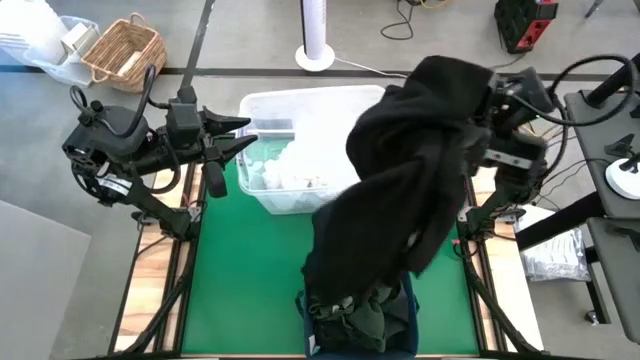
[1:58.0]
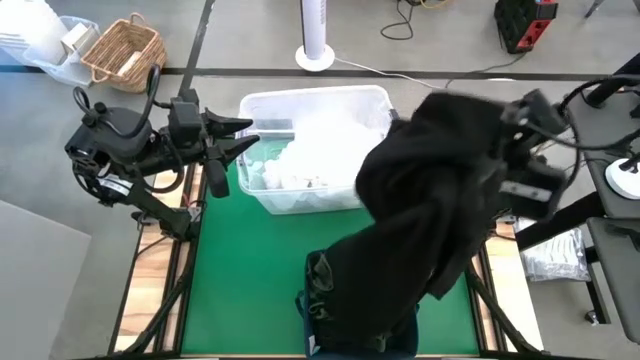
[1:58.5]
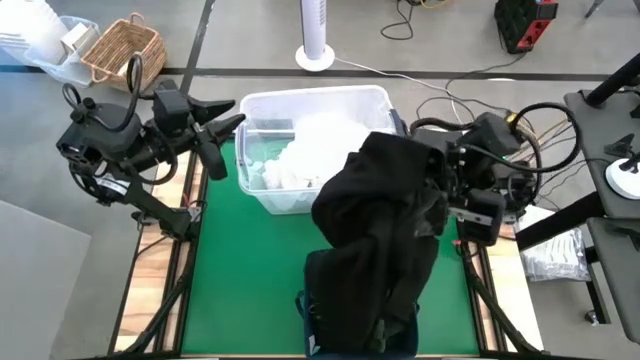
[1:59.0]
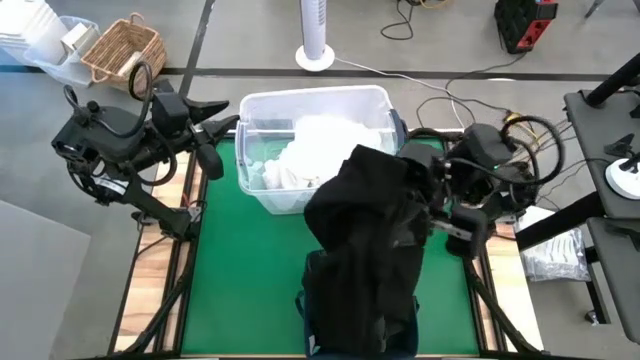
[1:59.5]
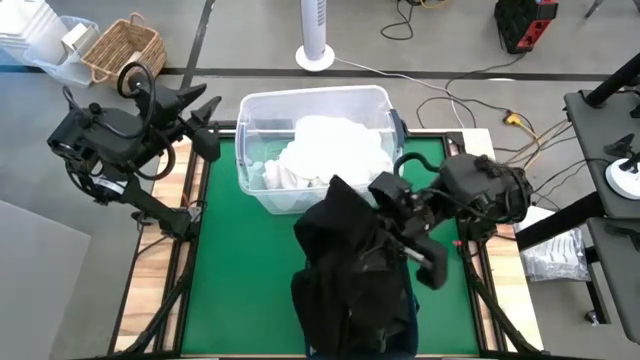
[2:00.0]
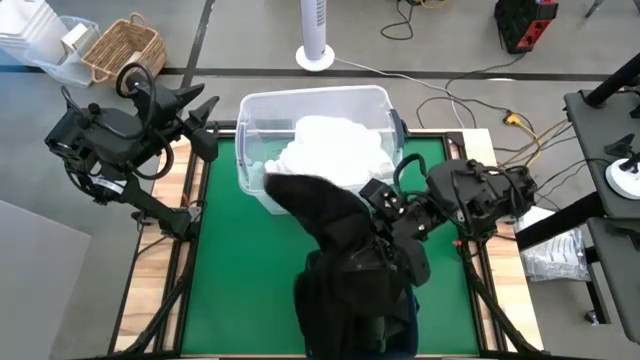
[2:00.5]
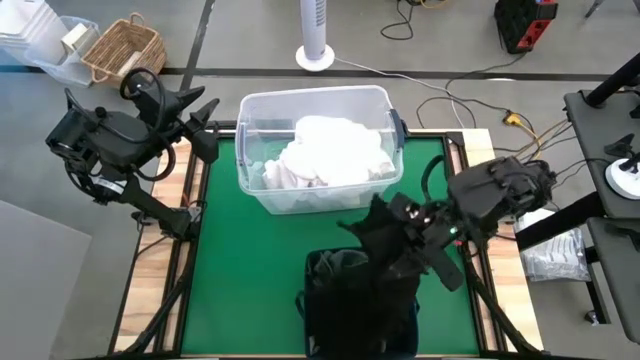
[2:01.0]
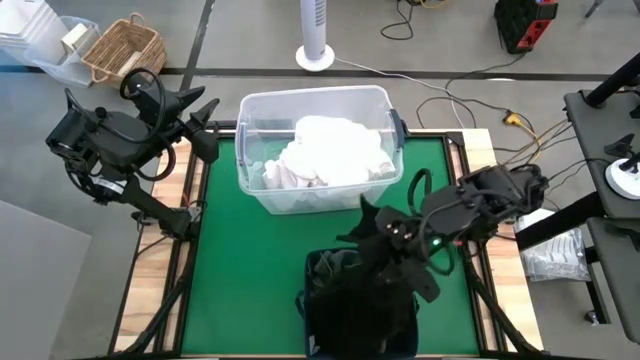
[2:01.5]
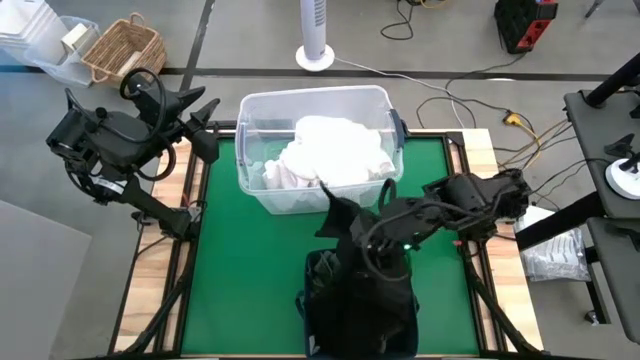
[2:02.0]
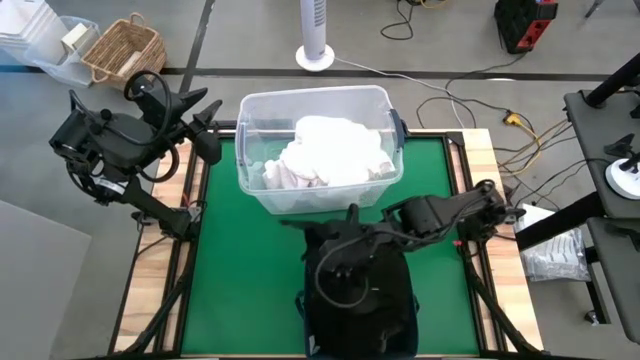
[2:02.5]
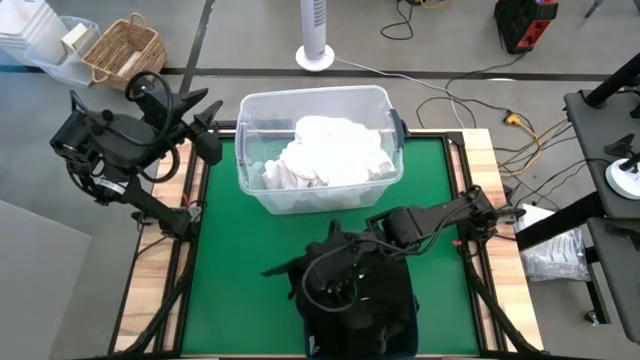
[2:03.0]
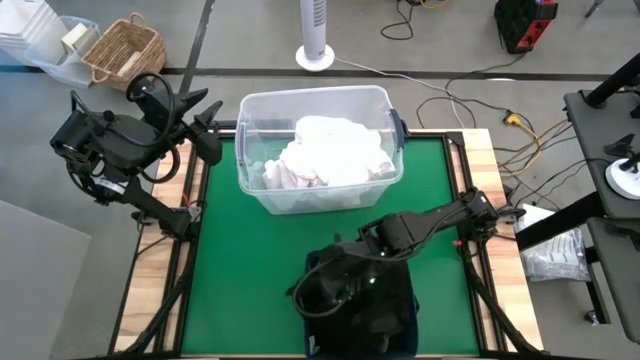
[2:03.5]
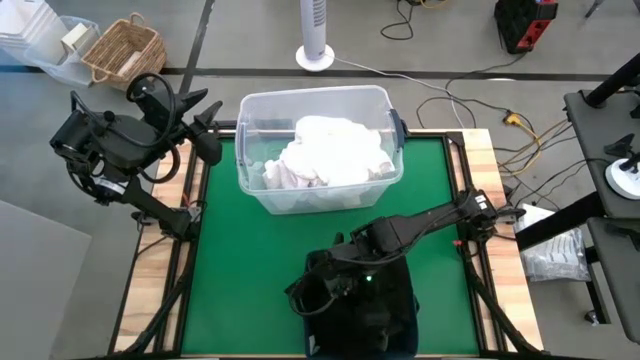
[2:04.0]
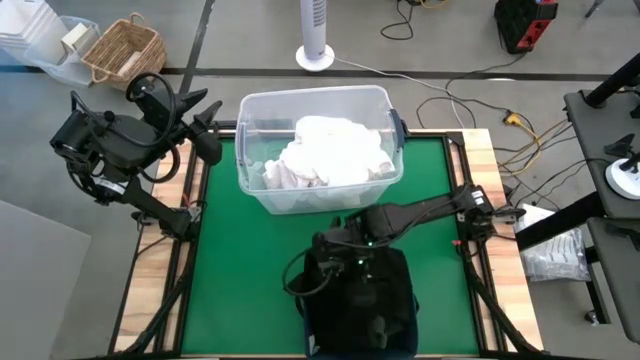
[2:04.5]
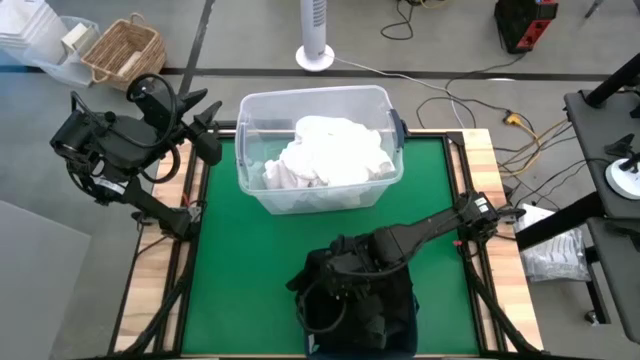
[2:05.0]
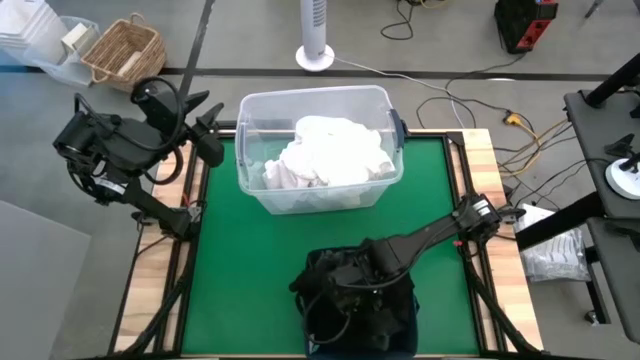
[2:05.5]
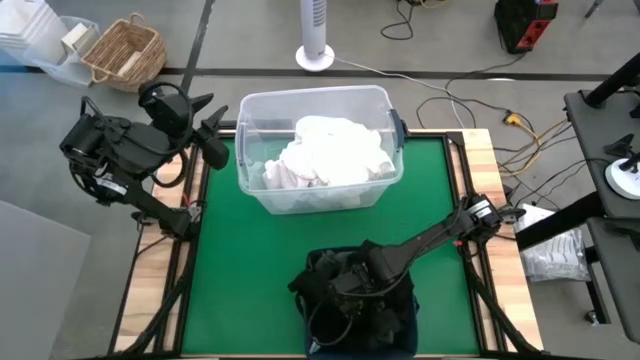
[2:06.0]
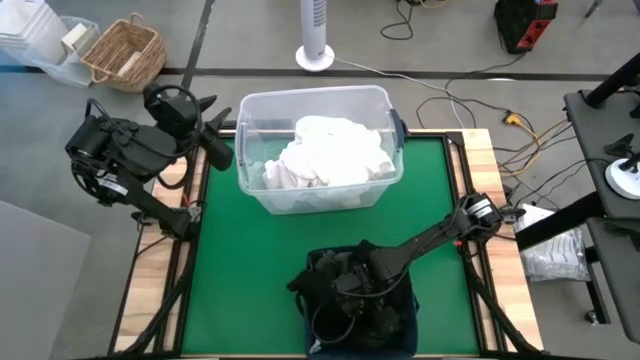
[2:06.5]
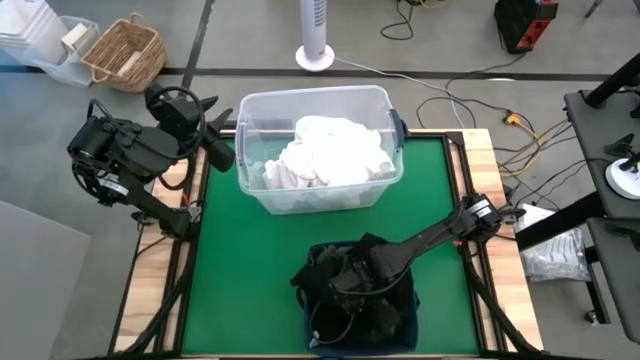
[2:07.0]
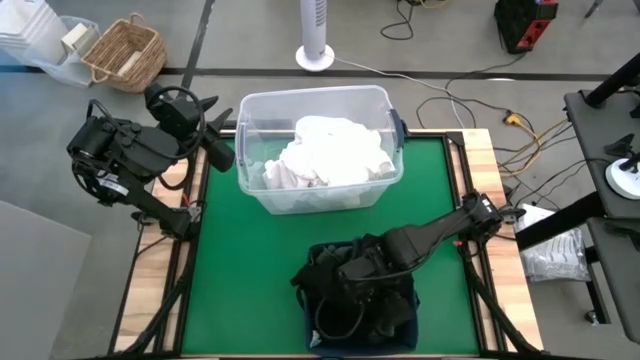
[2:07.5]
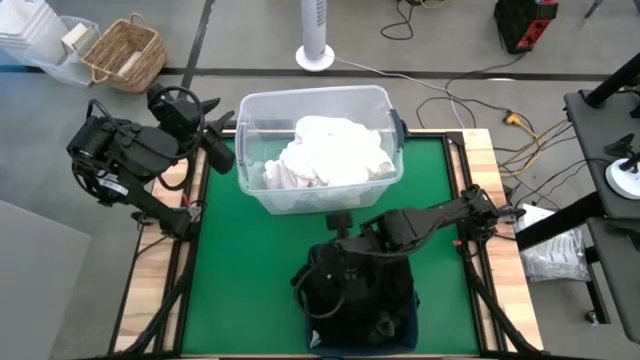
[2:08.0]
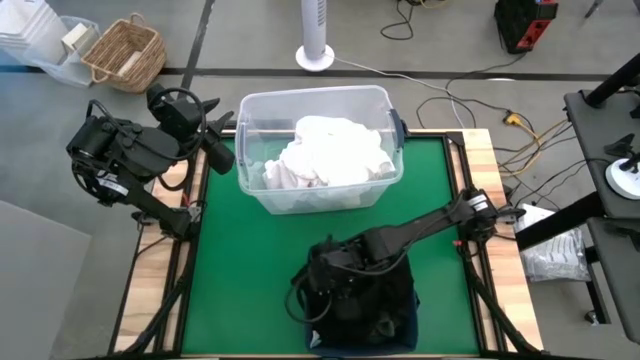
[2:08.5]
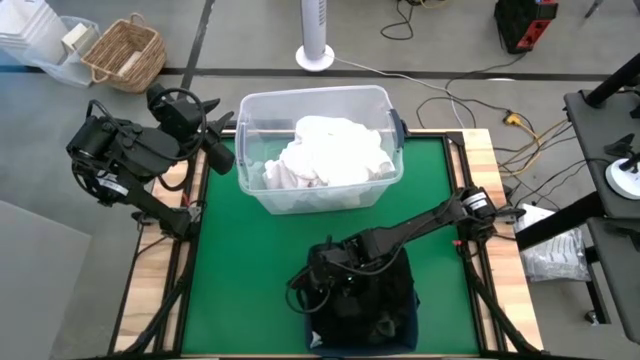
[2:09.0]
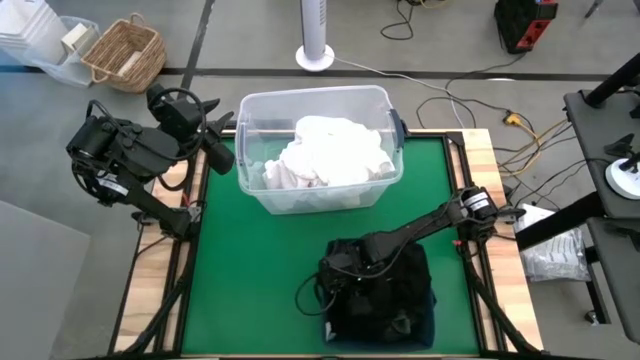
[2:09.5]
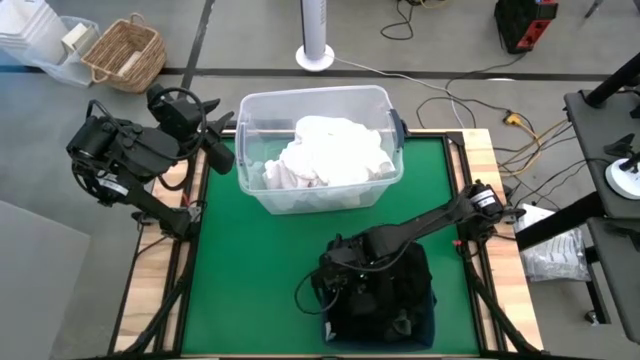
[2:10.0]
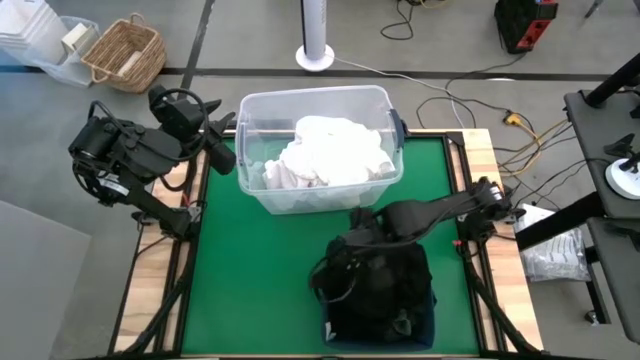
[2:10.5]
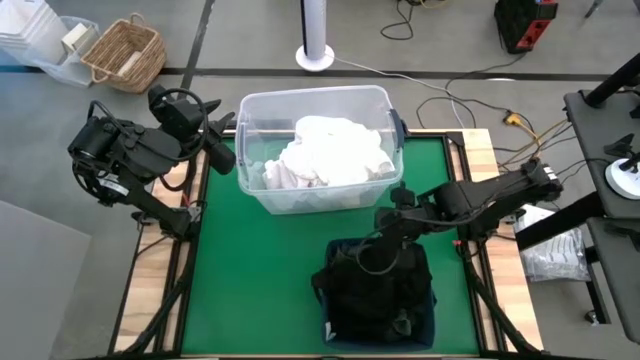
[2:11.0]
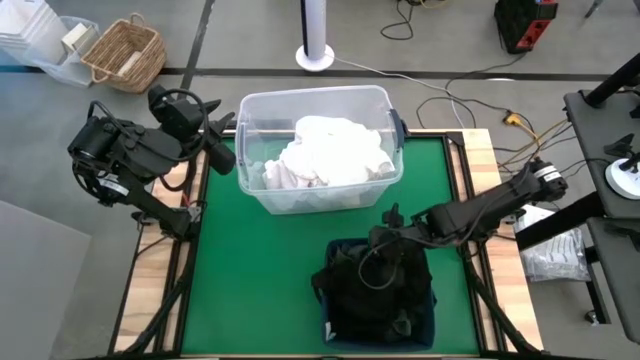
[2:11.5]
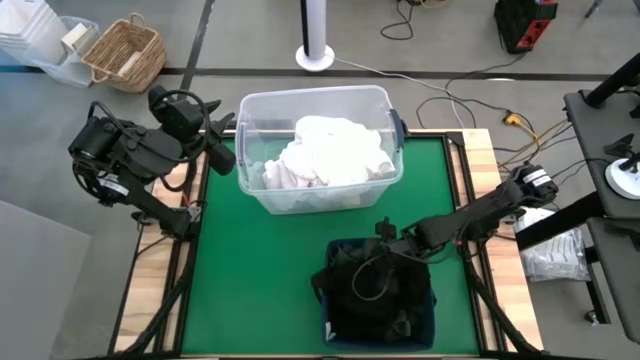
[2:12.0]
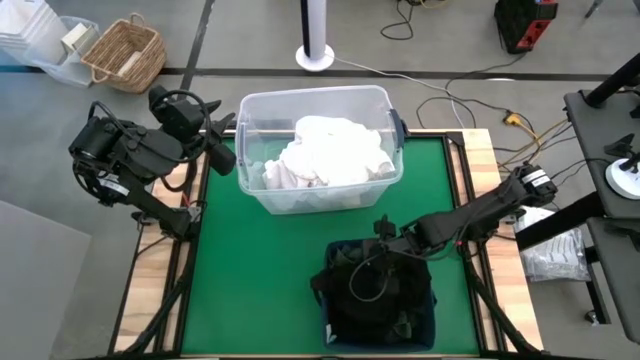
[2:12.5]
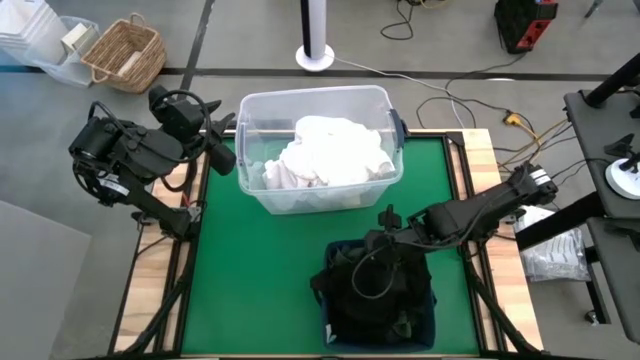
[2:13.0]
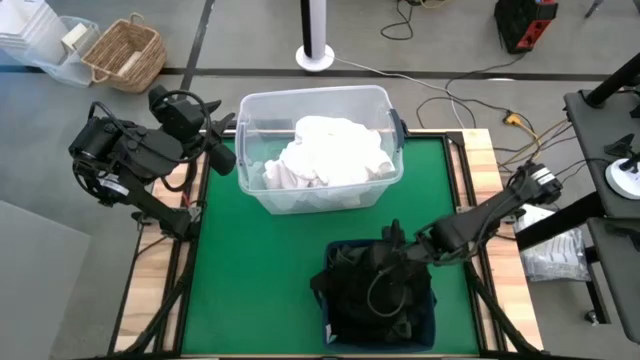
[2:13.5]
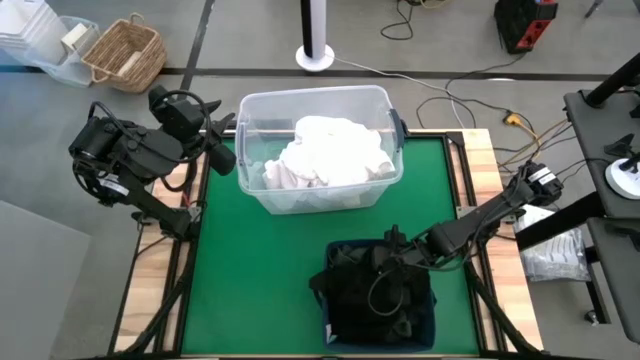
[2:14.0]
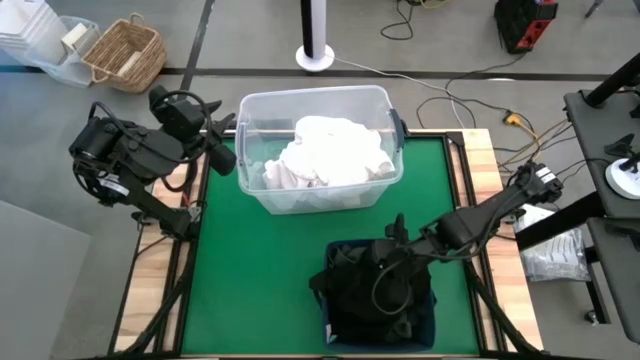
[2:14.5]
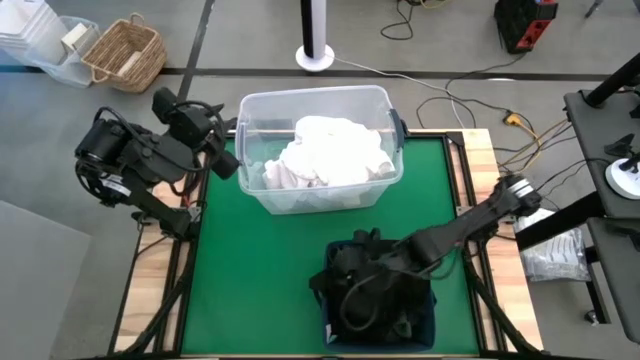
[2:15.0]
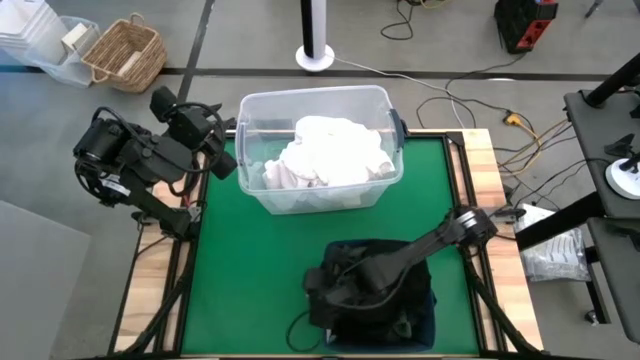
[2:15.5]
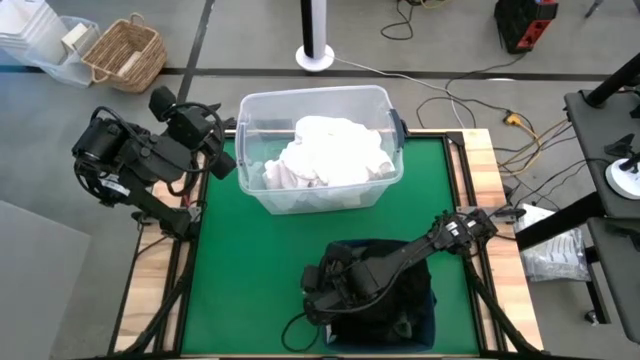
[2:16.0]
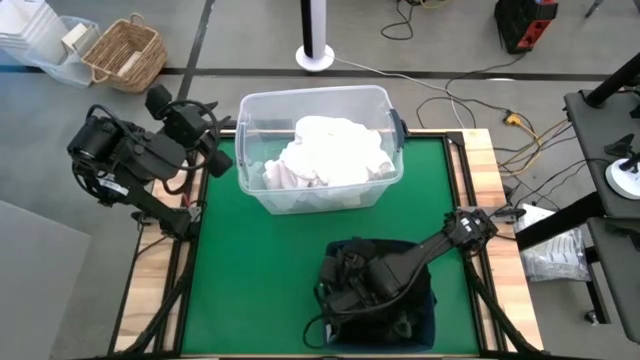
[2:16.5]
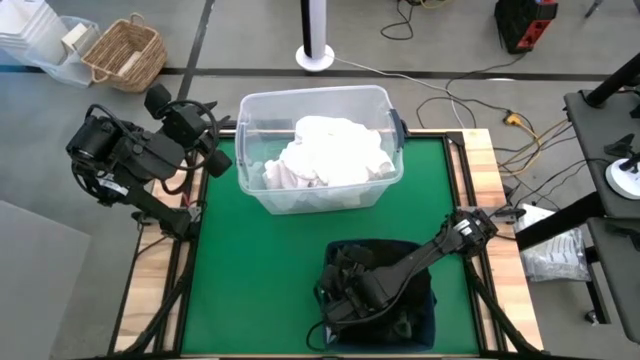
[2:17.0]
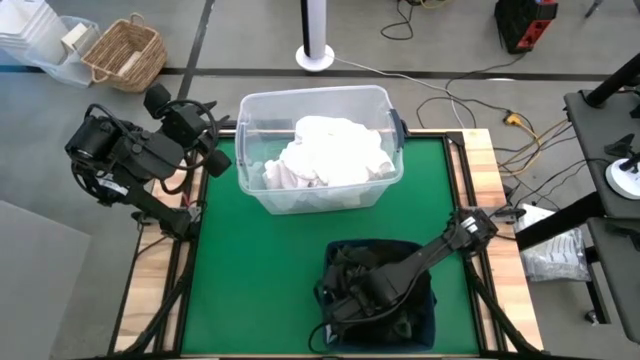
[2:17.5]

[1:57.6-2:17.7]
Put the black shirt into the blue laundry bin
